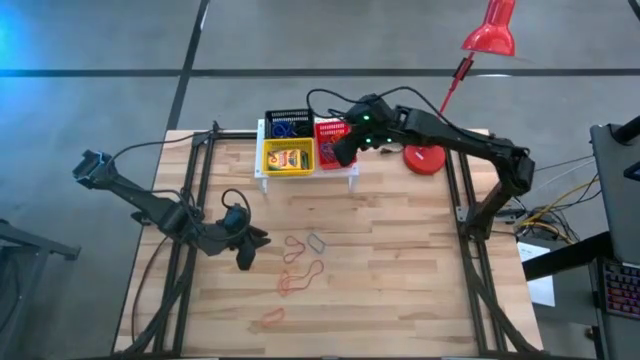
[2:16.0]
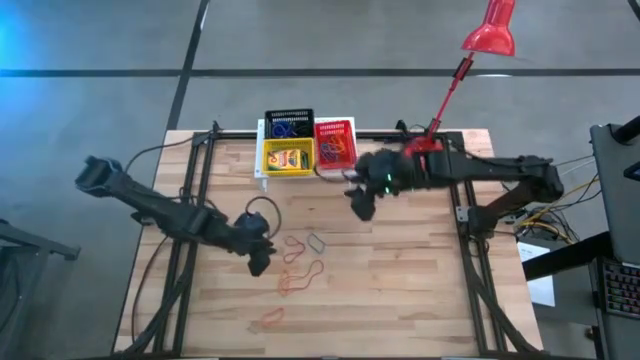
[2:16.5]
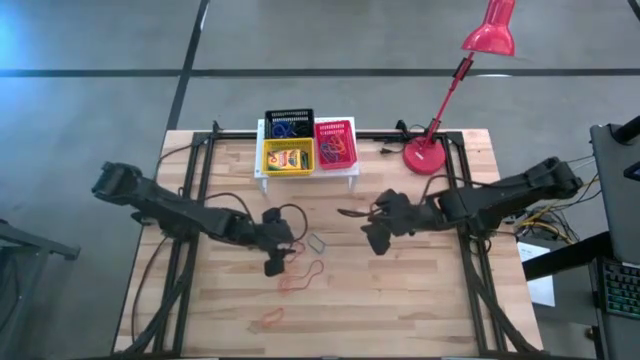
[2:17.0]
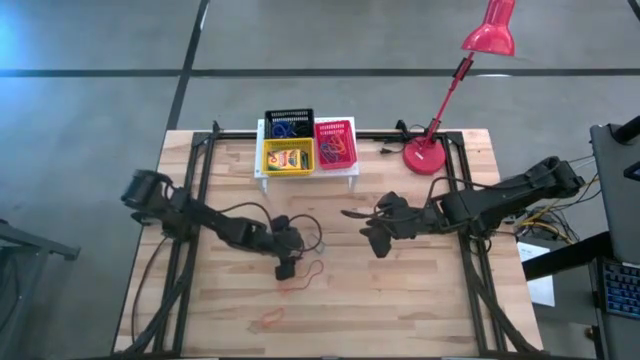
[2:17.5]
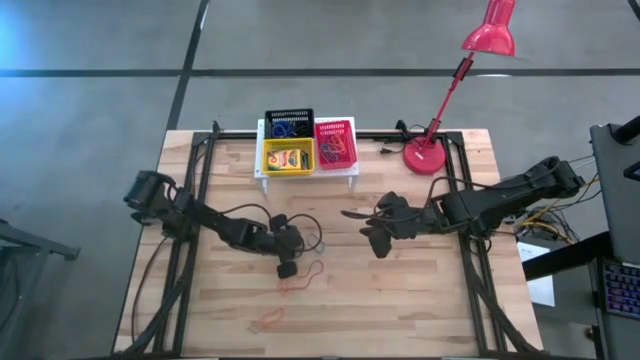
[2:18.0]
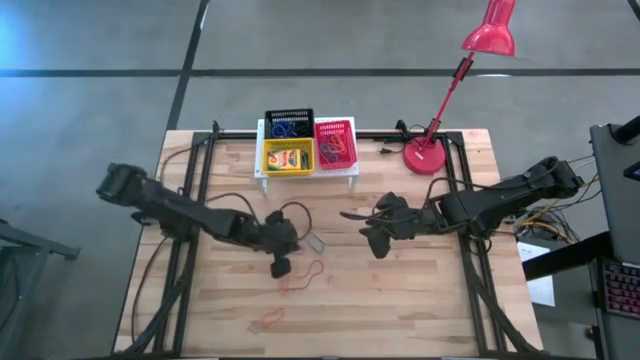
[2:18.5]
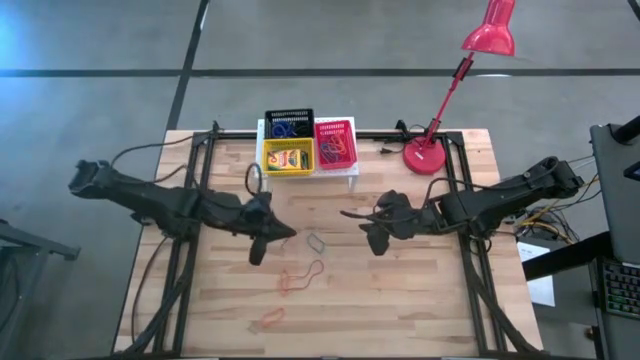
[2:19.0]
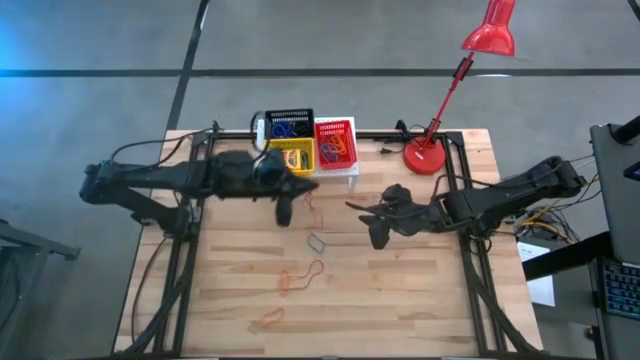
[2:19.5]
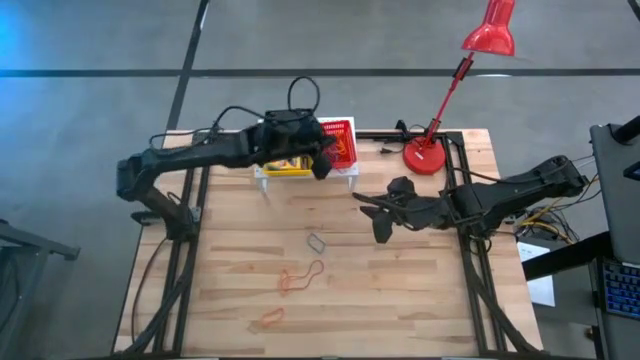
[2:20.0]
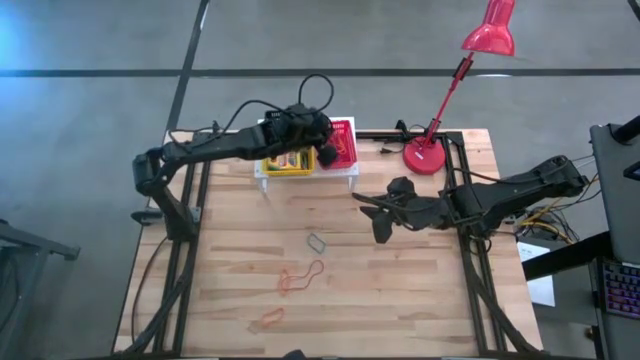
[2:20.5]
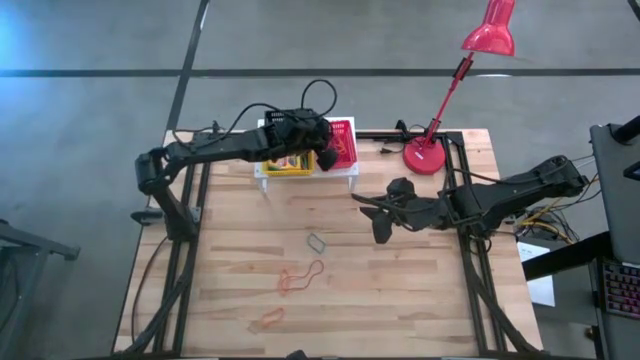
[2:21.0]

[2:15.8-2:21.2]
Task: Pick & Place Office Desk Supplies
Put the red rubber band into the red basket on the shelf

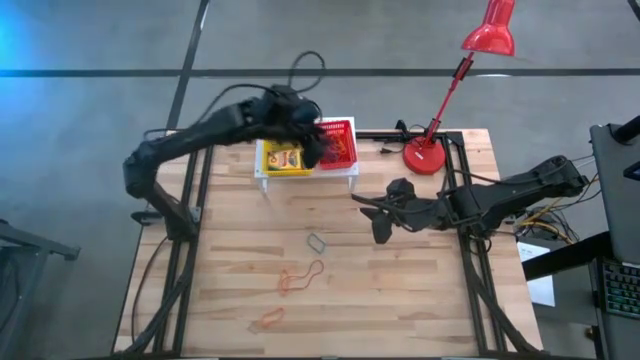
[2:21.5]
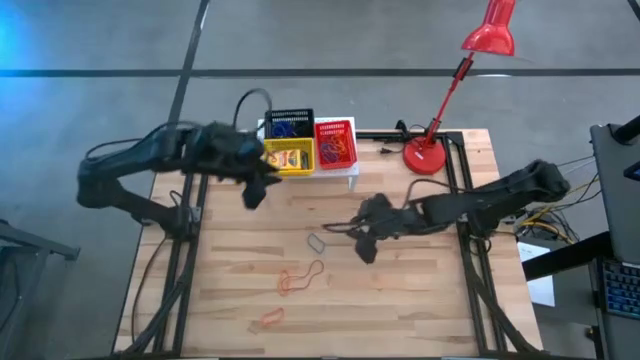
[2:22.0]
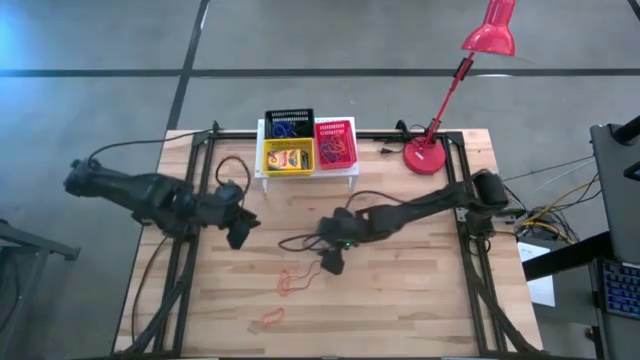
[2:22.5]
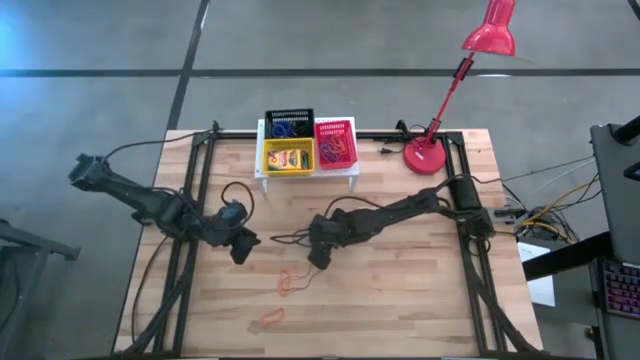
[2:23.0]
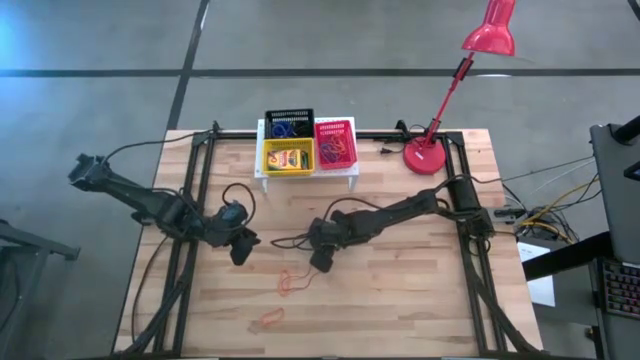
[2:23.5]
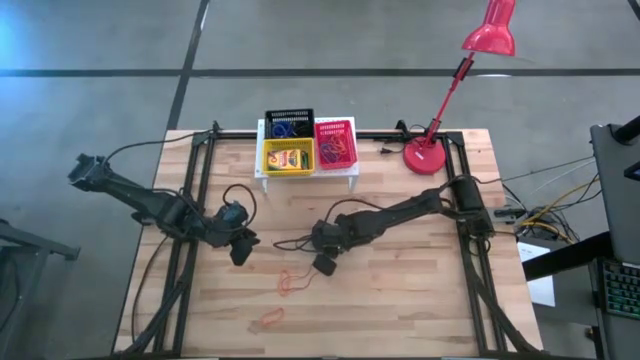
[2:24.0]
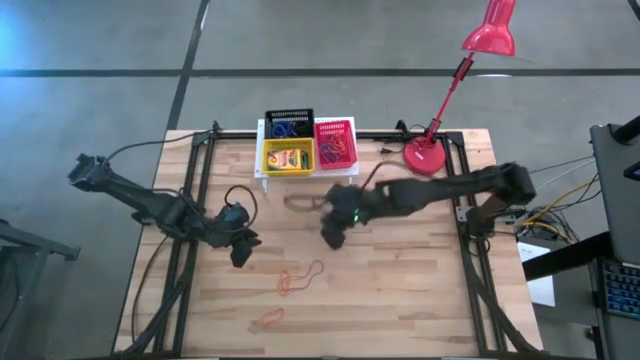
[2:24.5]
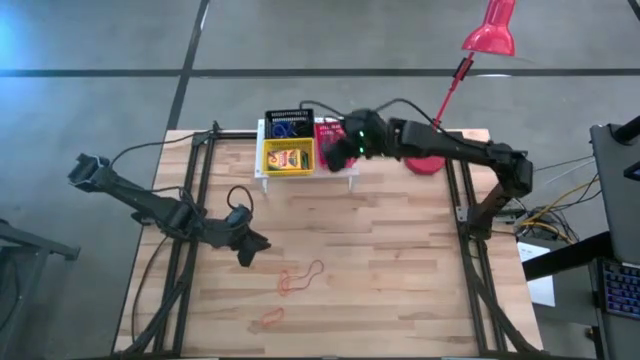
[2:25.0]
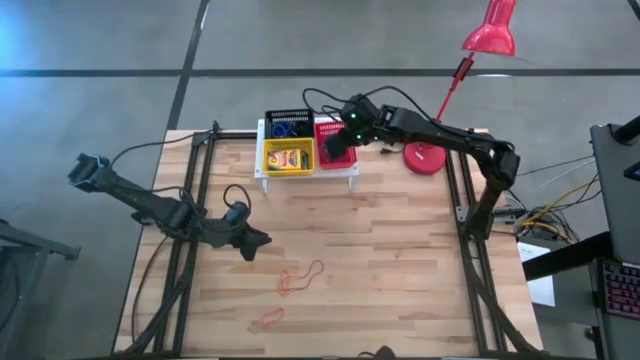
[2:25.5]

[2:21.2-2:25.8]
Put the blue rubber band into the red basket on the shelf

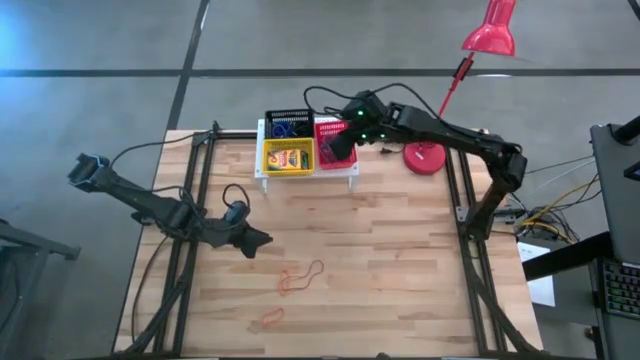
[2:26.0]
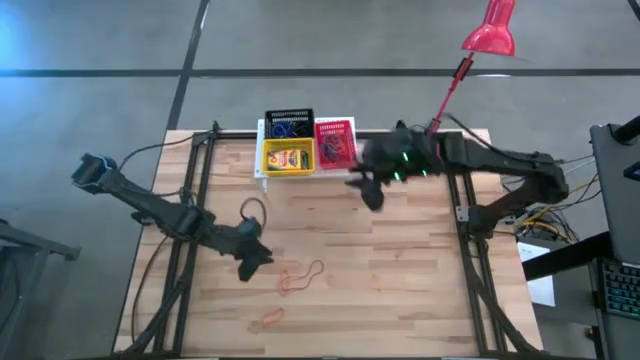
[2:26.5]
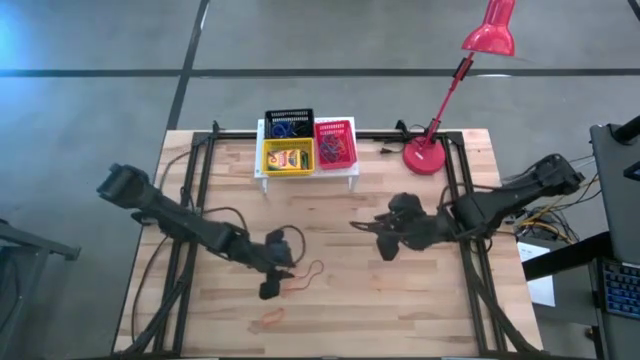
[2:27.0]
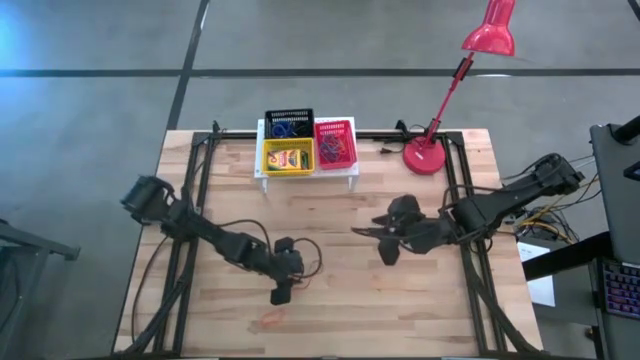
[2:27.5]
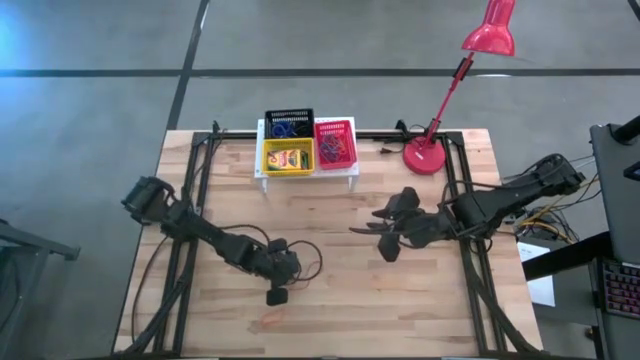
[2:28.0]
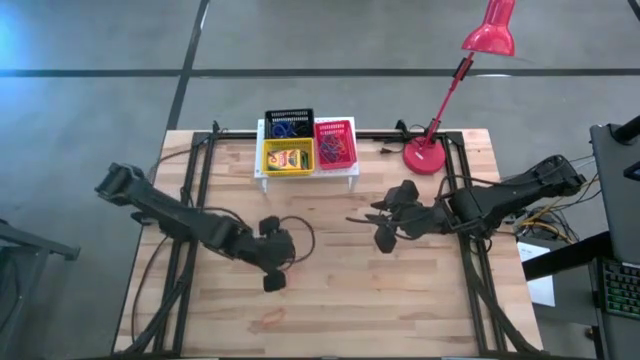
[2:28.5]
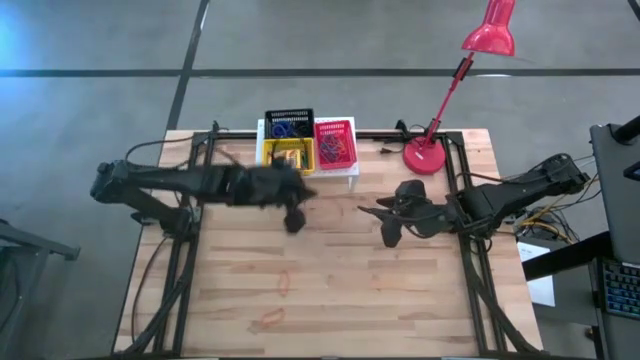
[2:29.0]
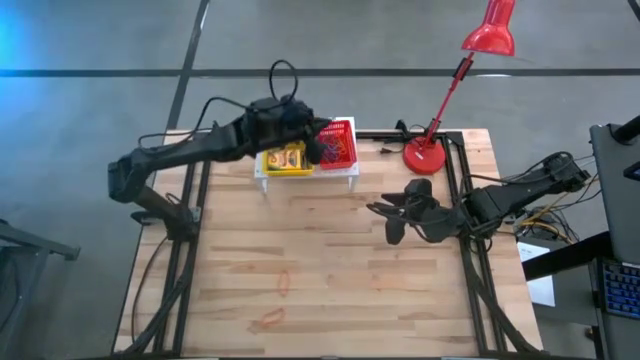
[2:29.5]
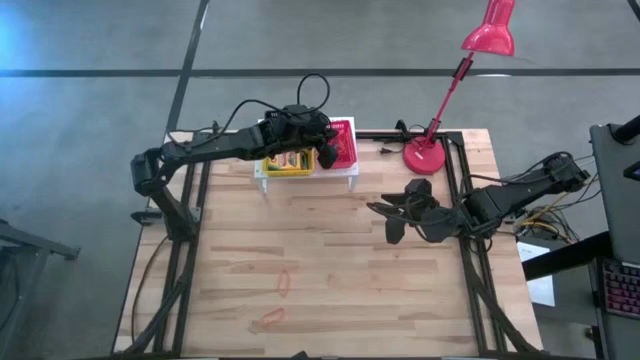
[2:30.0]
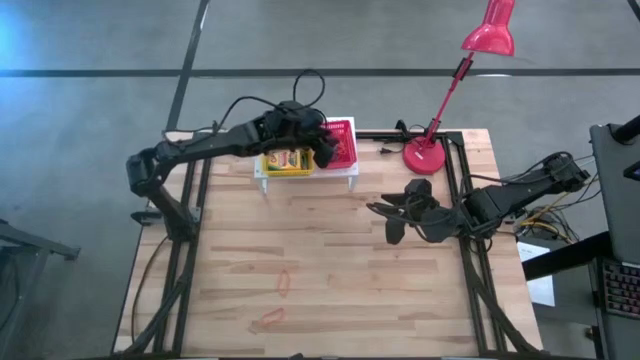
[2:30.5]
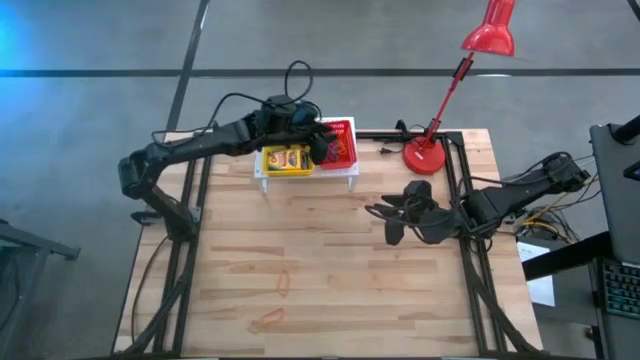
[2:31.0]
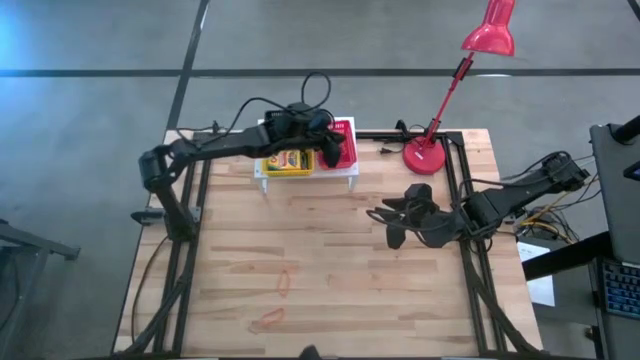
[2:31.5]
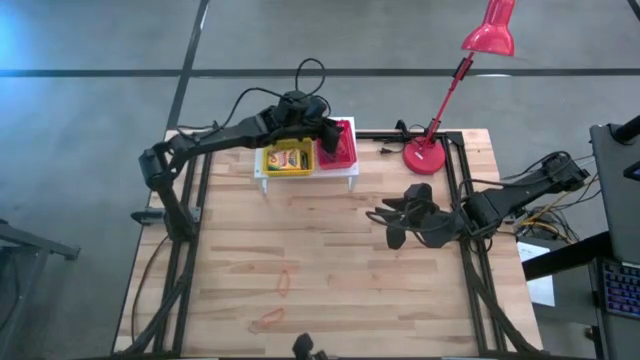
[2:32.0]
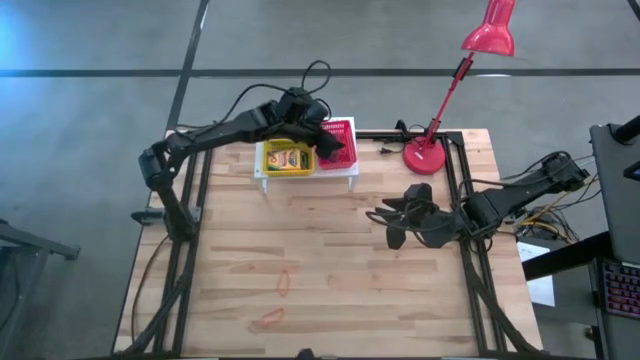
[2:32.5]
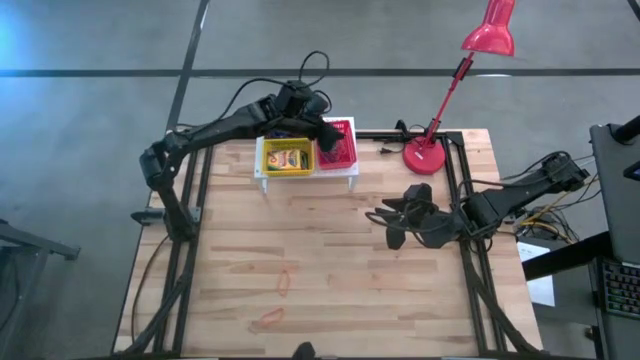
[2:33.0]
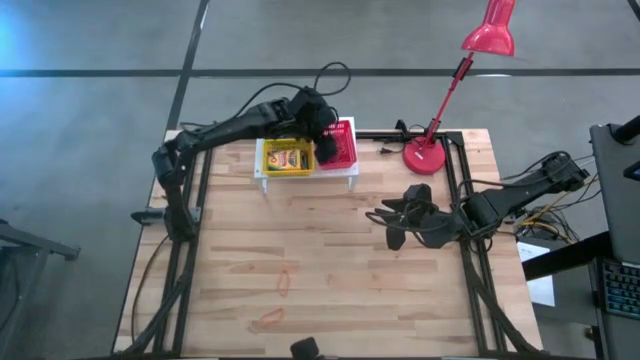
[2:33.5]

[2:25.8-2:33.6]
Put the red rubber band into the red basket on the shelf

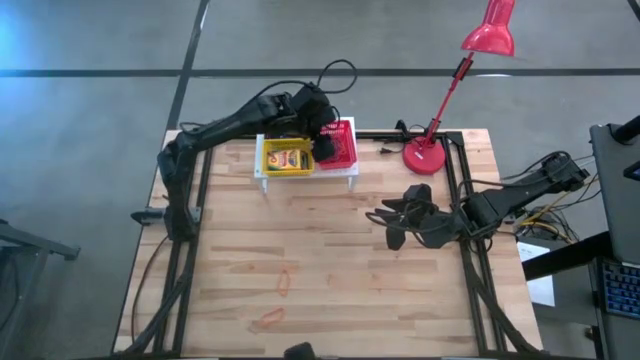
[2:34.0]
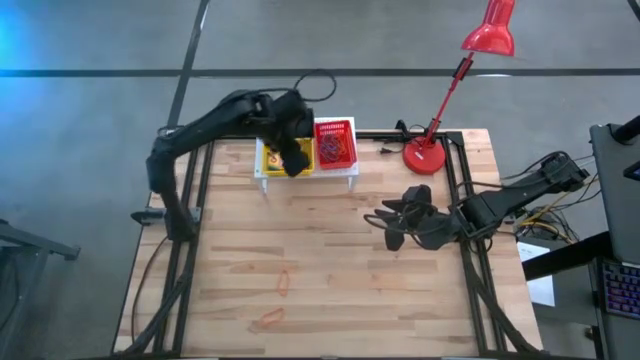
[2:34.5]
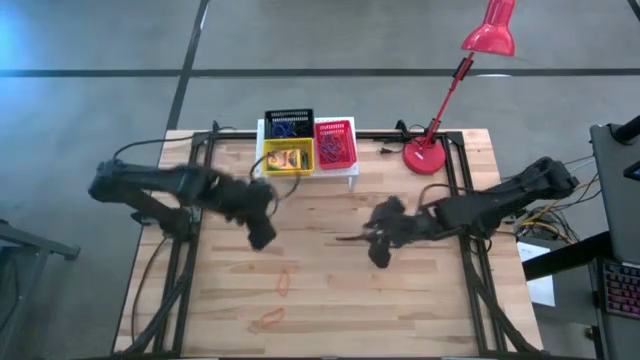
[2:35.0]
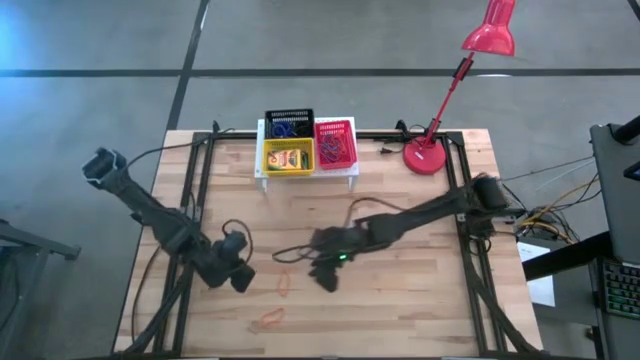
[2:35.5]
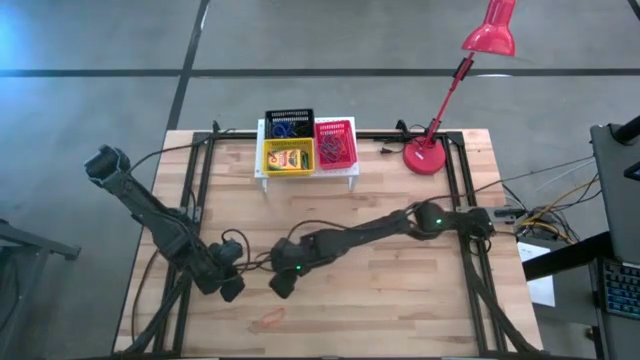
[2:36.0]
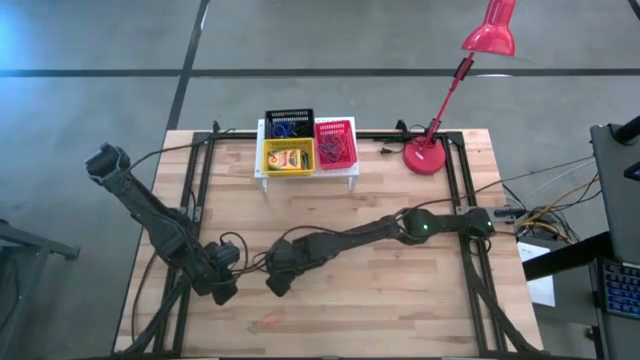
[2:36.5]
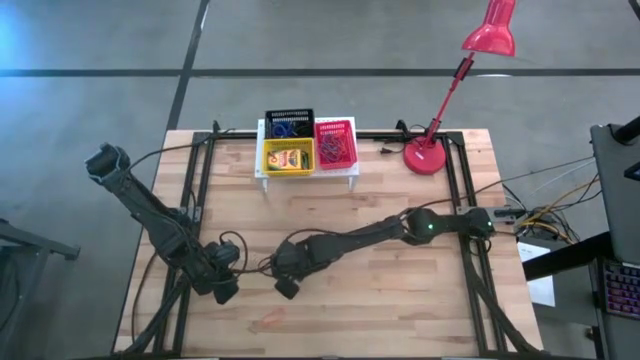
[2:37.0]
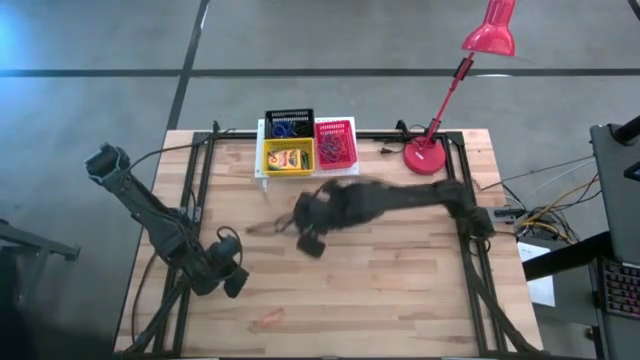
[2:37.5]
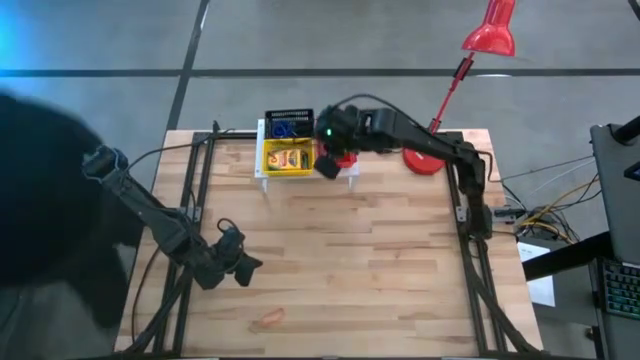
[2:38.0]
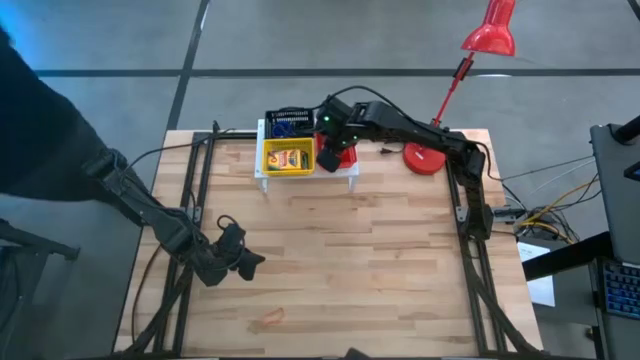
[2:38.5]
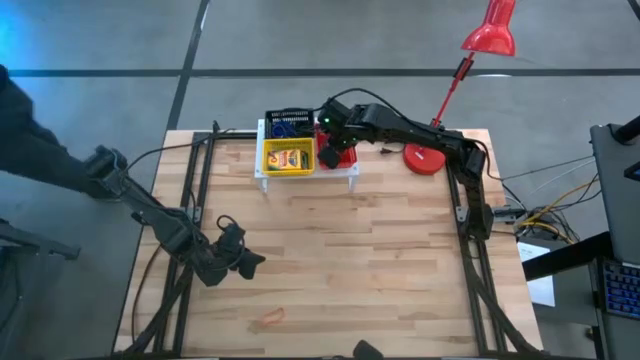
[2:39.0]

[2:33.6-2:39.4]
Put the orange rubber band into the red basket on the shelf
